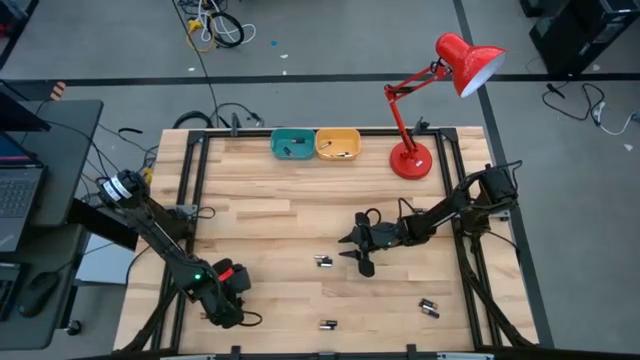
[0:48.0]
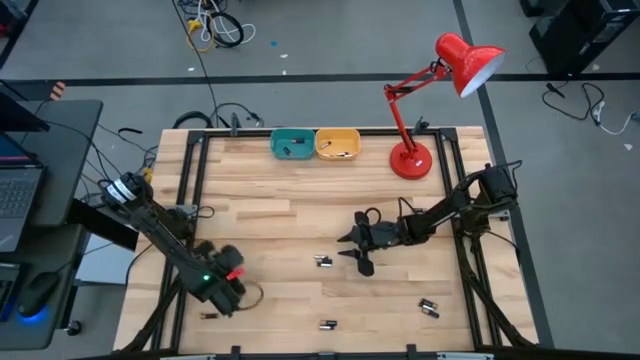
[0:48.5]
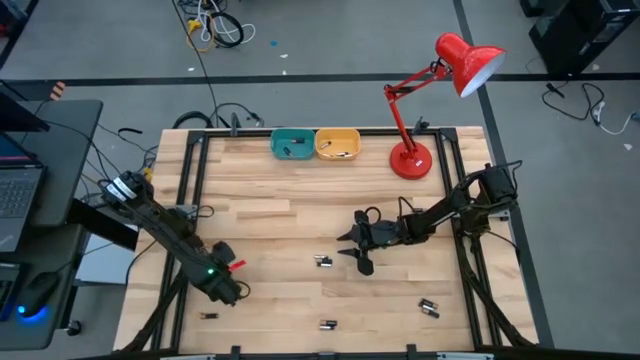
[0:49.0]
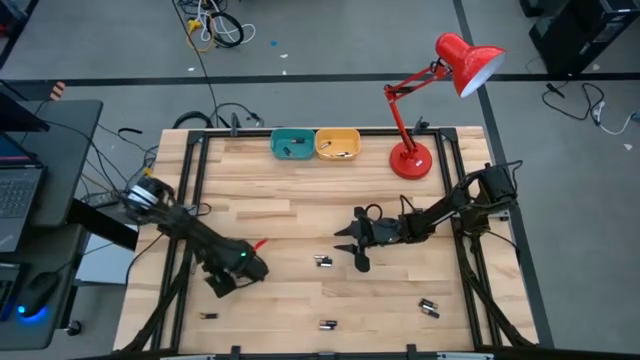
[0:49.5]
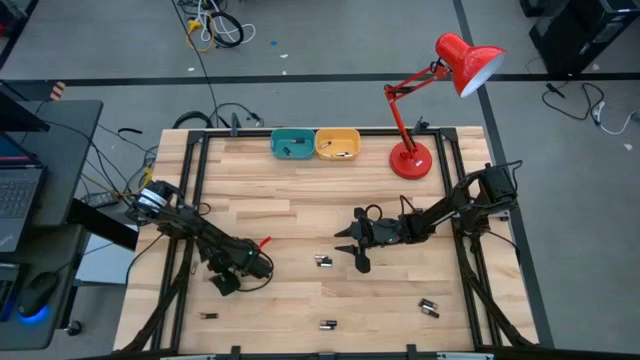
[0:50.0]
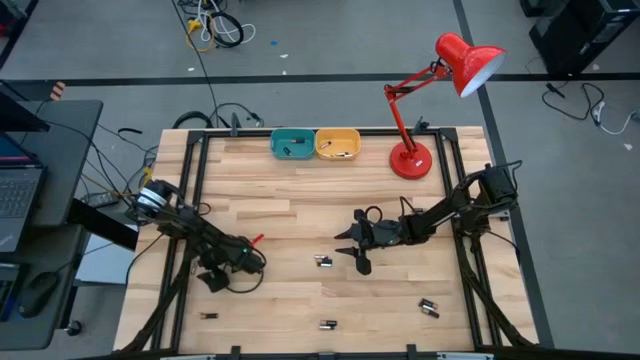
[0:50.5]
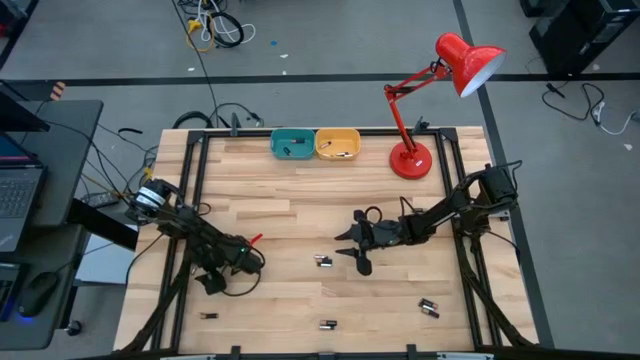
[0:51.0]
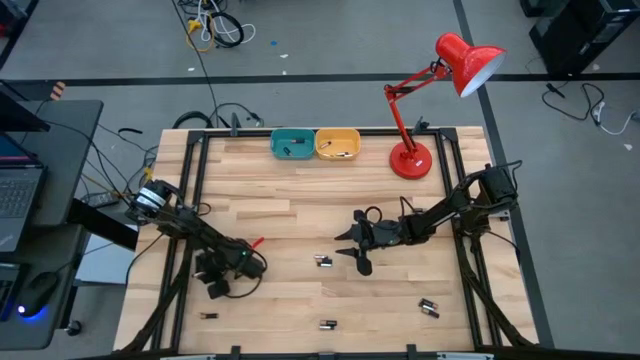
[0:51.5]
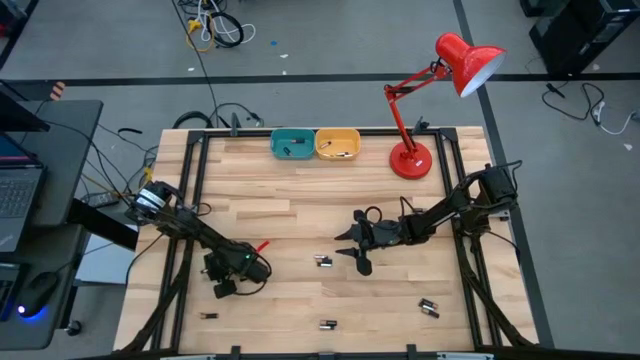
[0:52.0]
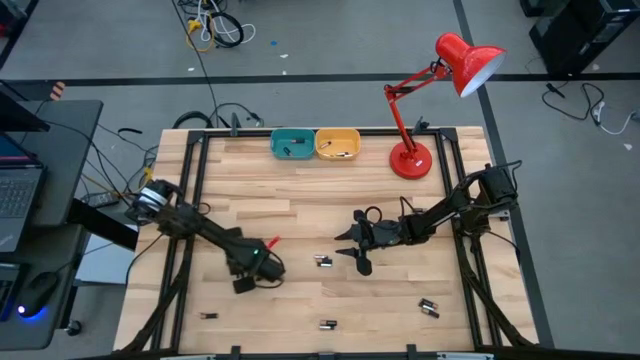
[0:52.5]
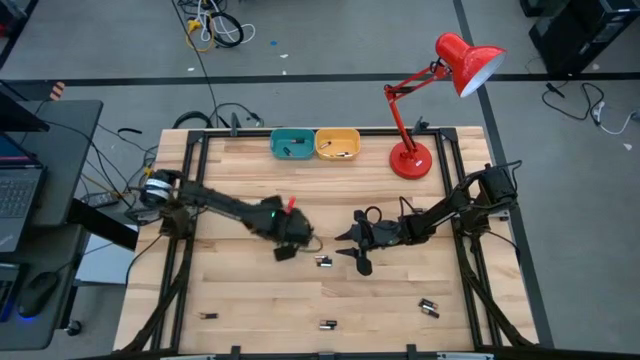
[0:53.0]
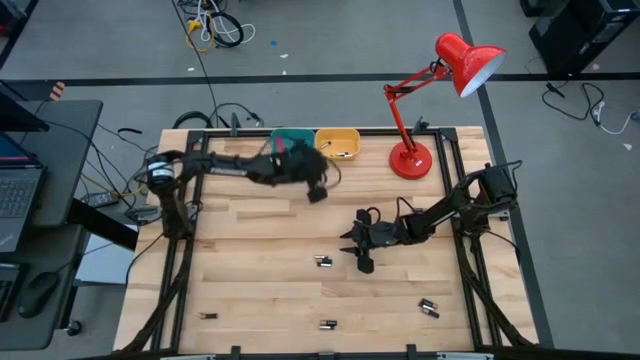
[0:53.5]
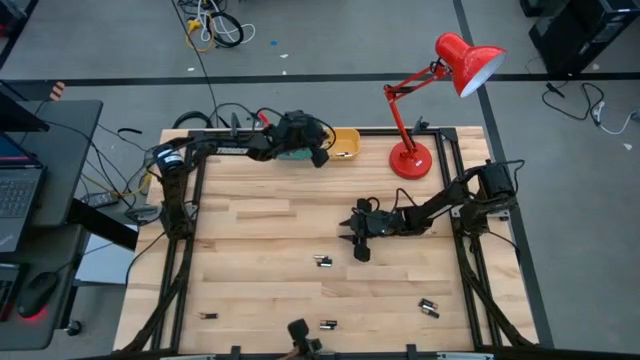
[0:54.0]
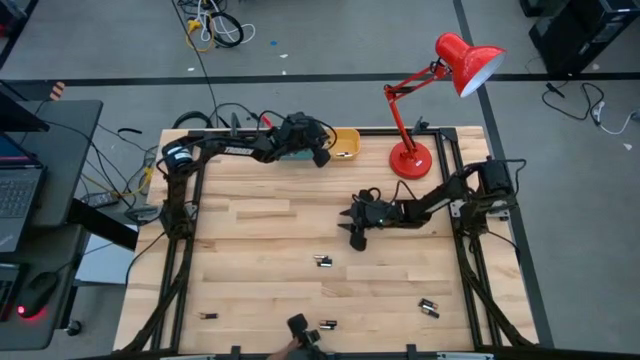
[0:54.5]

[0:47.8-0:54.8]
Task: Sort batteries
Put the white battery into the yellow bin

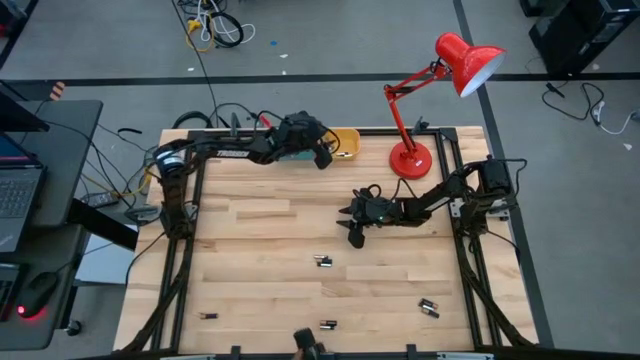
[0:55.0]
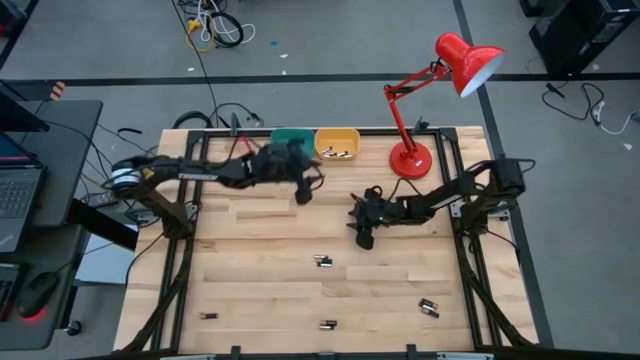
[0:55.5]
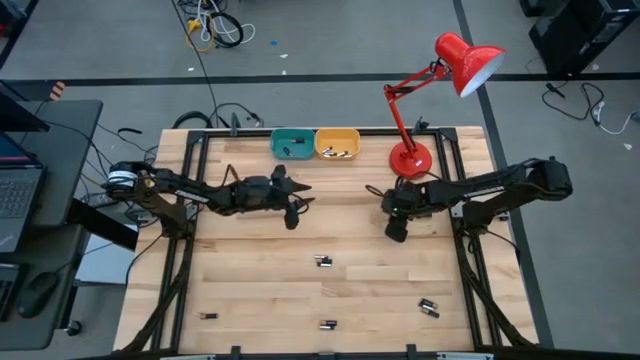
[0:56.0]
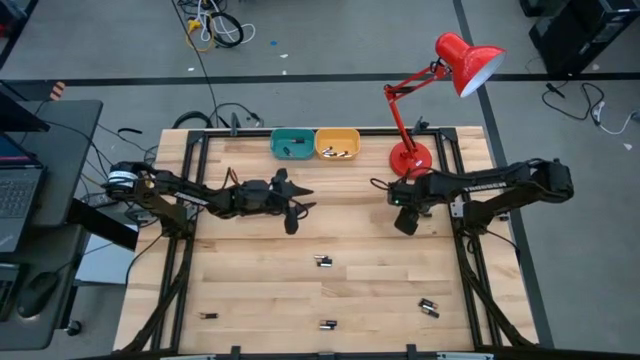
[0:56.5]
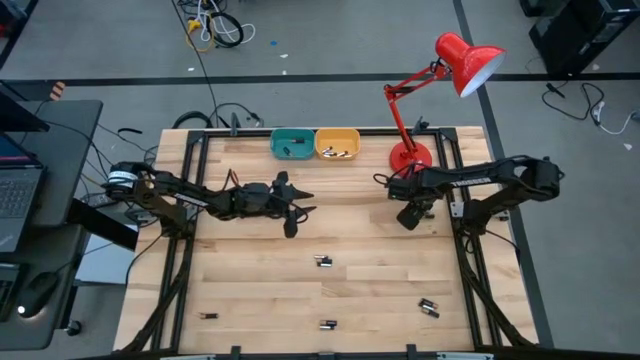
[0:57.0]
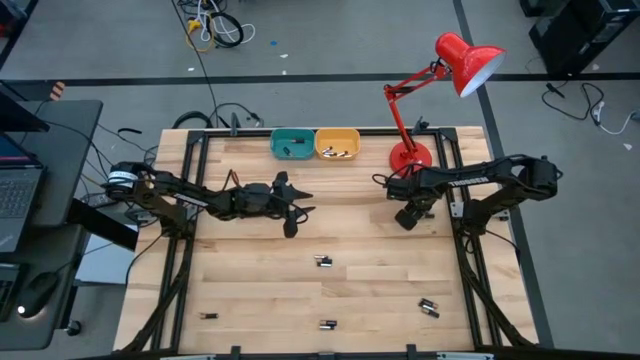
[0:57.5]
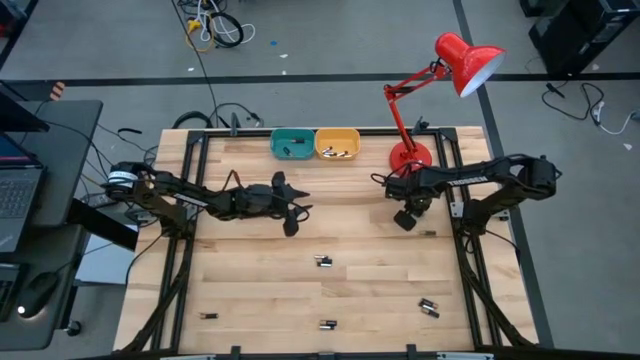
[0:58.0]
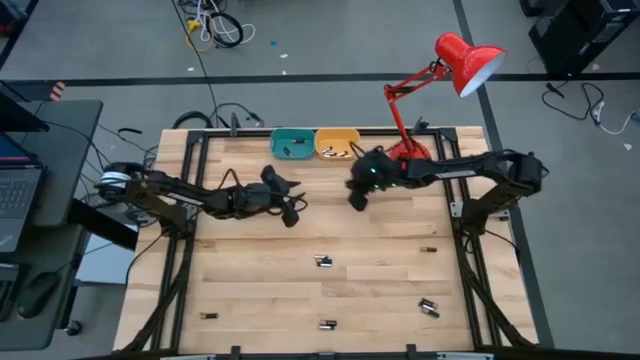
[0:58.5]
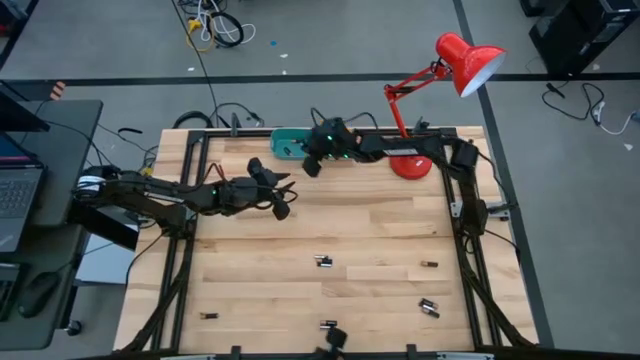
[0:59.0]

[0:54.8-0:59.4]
Put the black battery into the blue bin

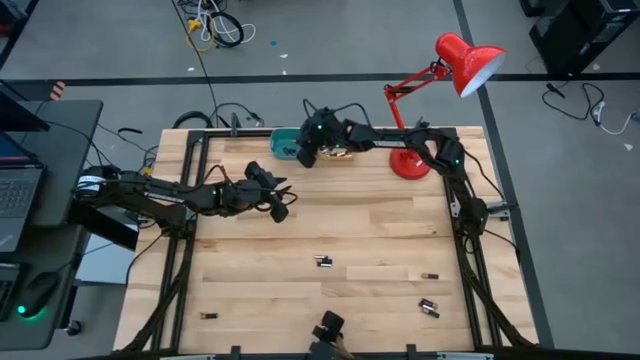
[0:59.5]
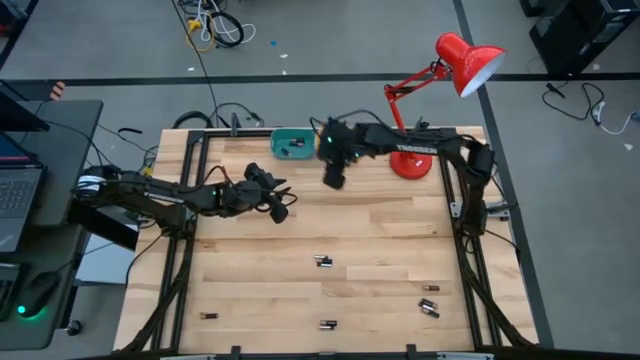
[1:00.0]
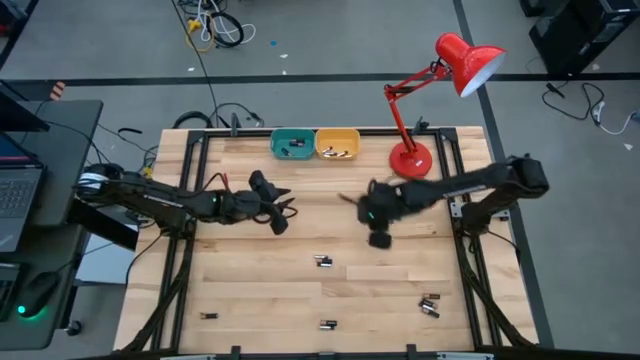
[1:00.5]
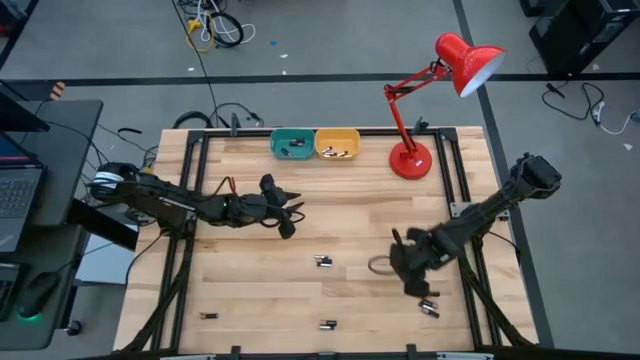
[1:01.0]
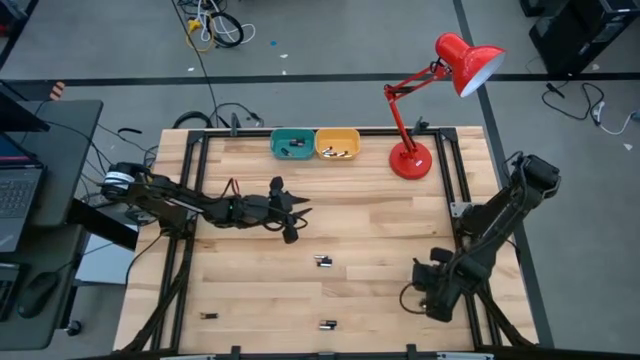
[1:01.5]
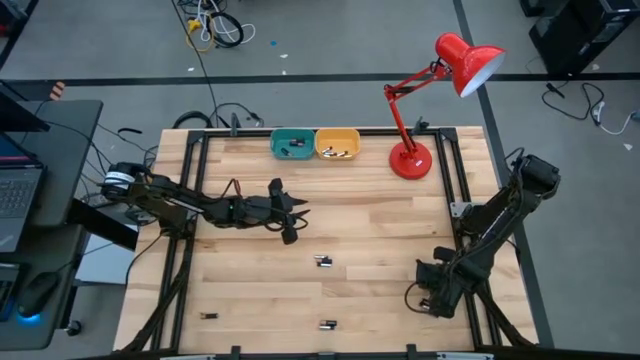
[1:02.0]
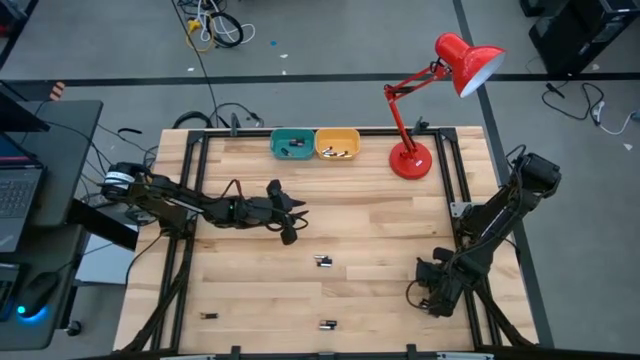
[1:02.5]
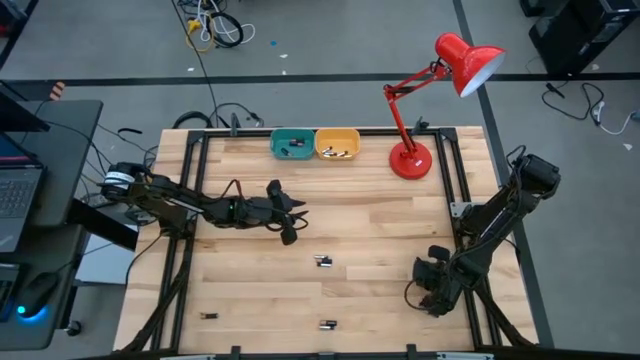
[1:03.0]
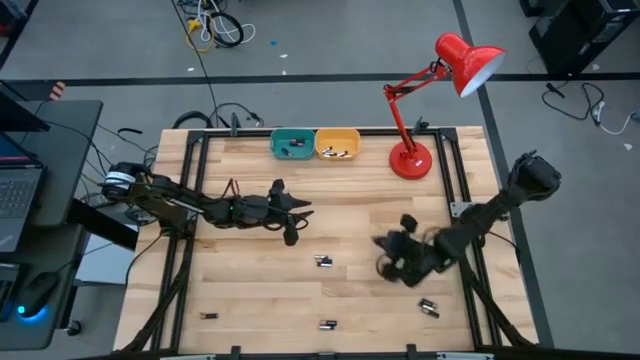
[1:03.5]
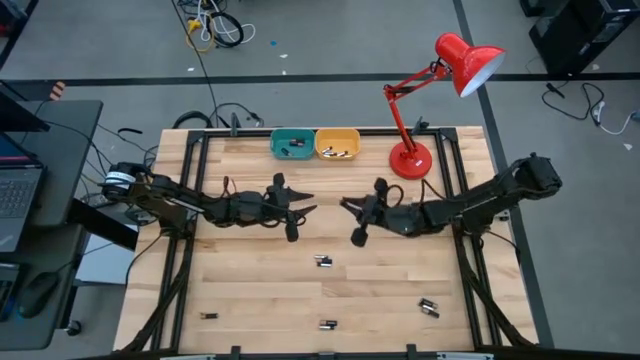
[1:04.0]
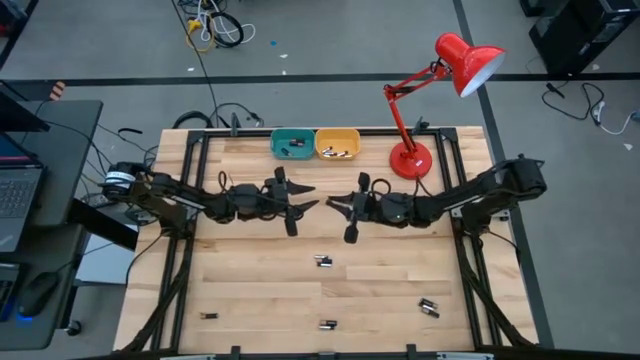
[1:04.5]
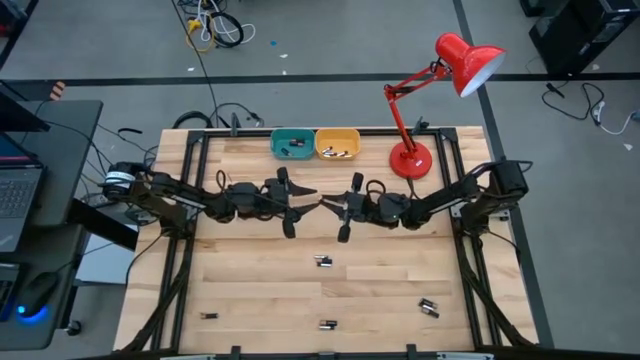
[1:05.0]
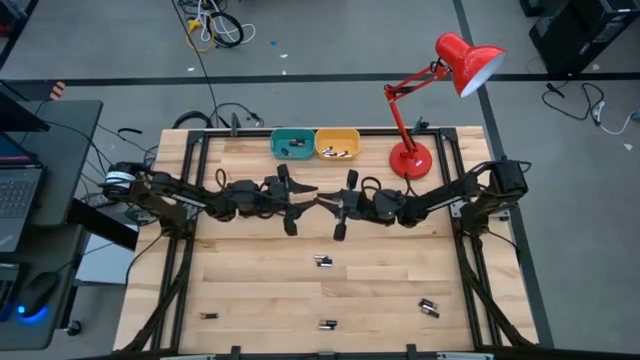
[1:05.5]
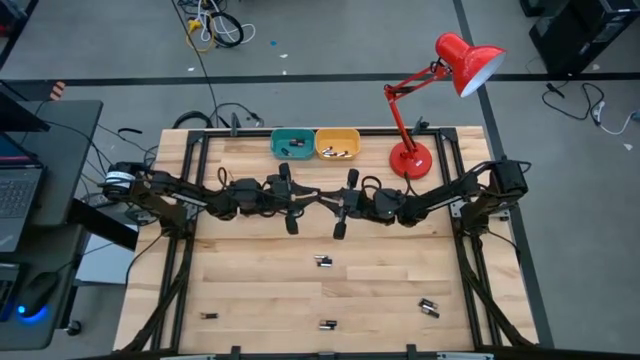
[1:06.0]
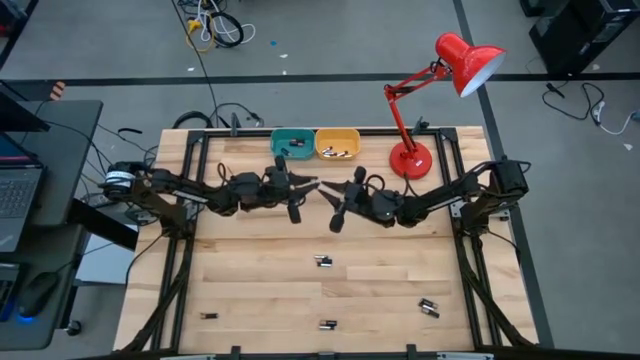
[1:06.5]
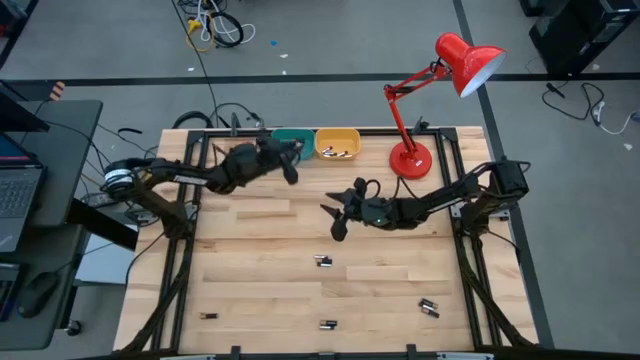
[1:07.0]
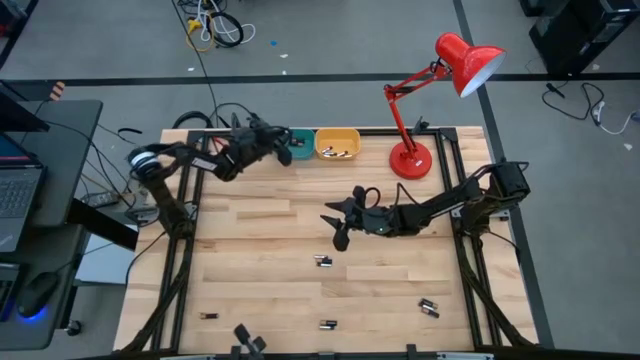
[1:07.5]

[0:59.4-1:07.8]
Put the black battery into the blue bin
